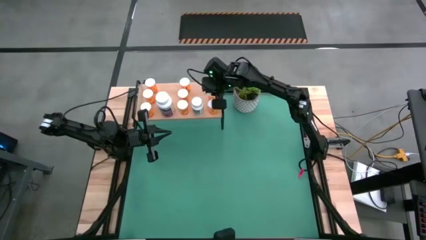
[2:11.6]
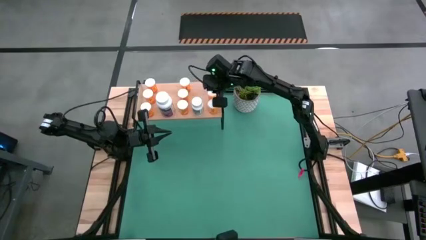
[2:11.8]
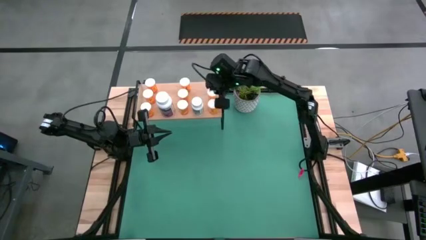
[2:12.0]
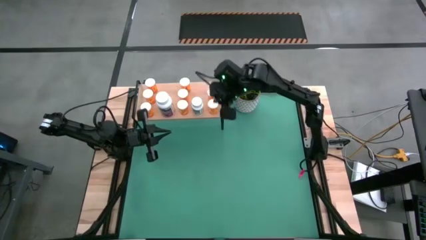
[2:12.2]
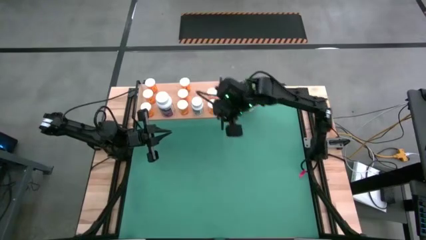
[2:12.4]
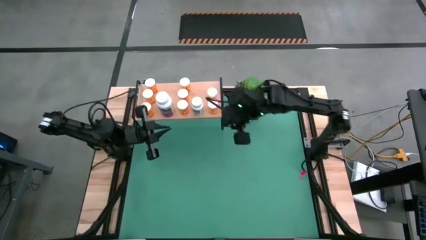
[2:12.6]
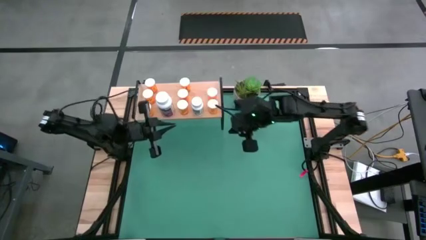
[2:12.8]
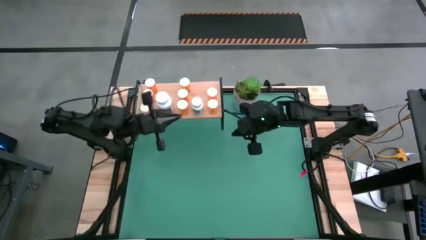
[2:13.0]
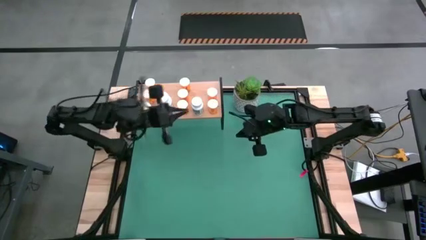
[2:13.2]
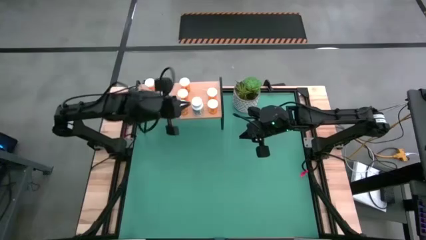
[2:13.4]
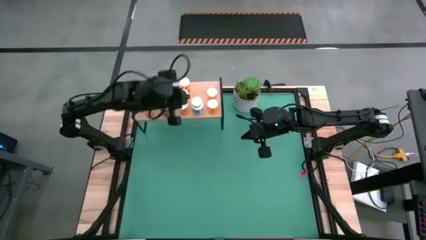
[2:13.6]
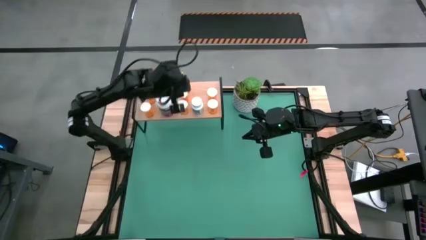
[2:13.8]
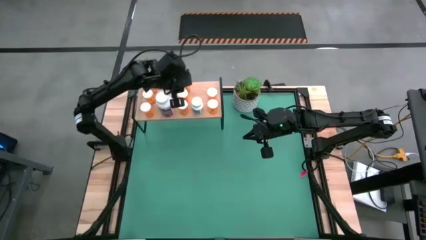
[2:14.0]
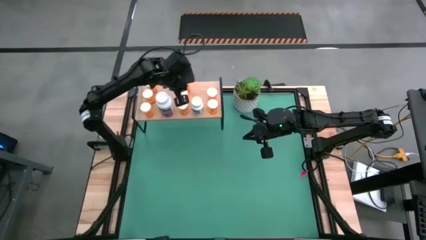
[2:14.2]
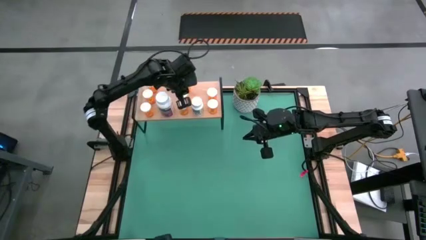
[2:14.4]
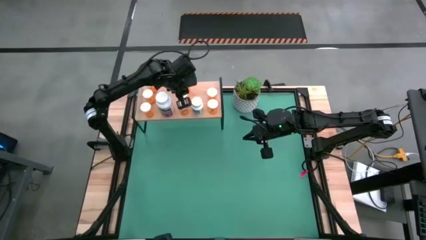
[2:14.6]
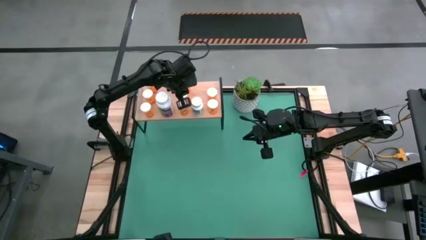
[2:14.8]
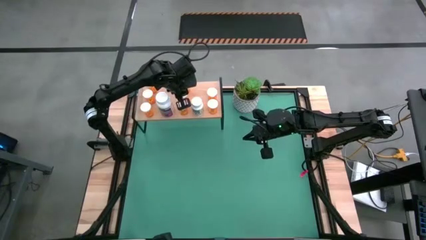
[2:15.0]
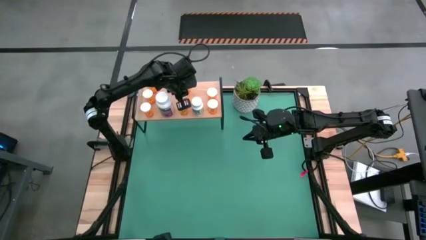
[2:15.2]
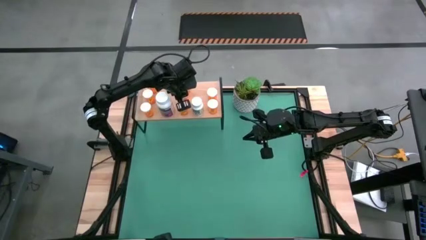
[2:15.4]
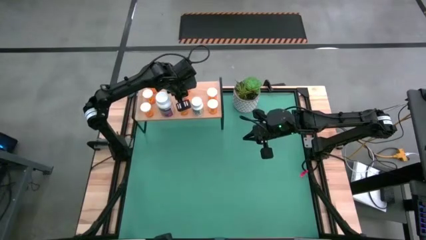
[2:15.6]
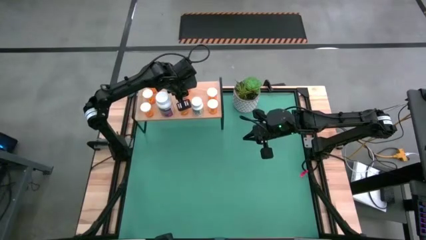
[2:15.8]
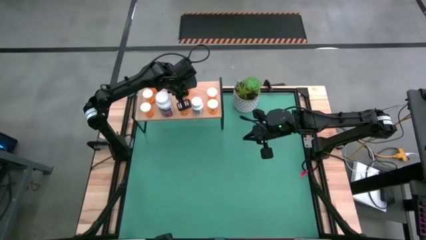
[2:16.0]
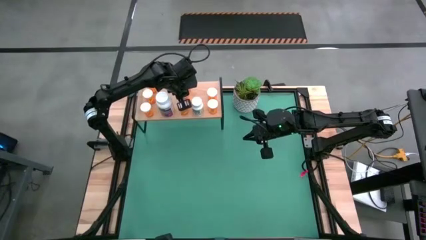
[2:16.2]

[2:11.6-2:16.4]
Task: Pick and place medicine bottles onto shelf by color
Adjust the orange pill bottle on the shelf

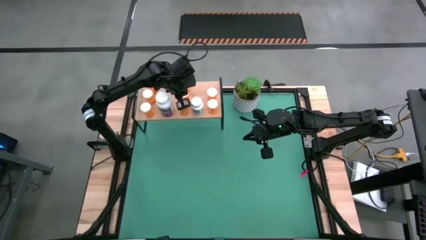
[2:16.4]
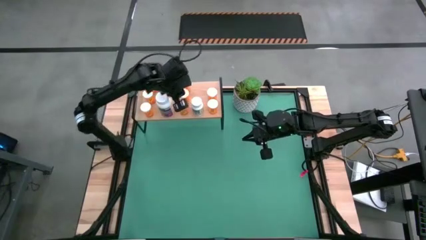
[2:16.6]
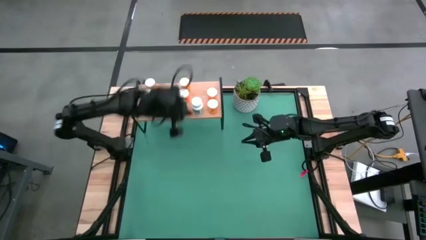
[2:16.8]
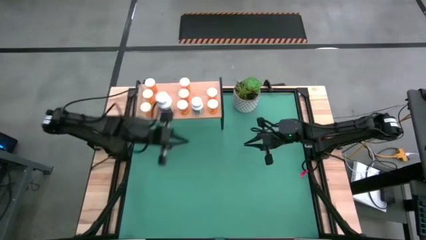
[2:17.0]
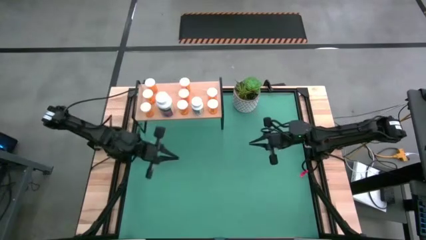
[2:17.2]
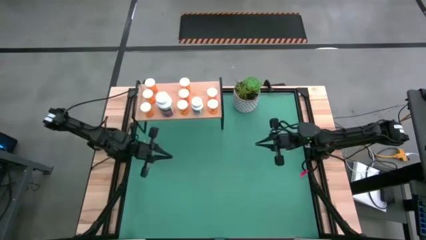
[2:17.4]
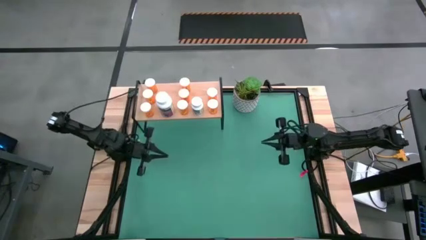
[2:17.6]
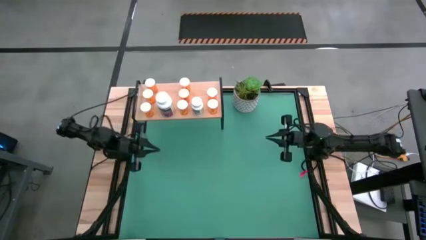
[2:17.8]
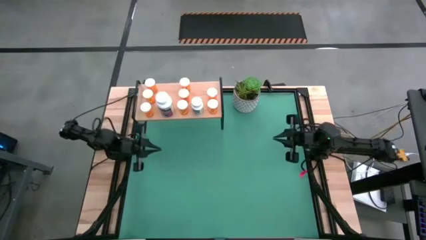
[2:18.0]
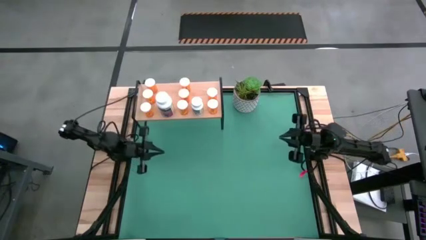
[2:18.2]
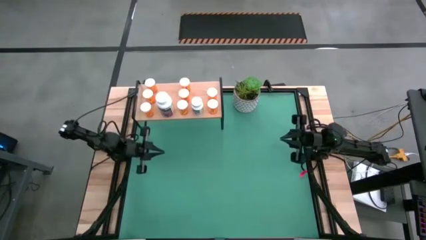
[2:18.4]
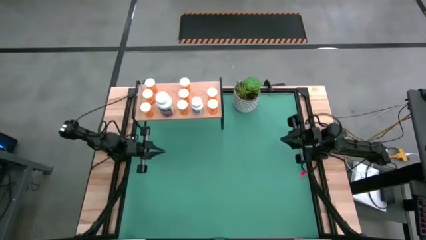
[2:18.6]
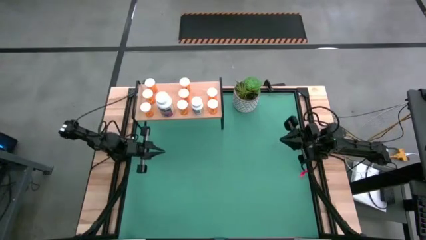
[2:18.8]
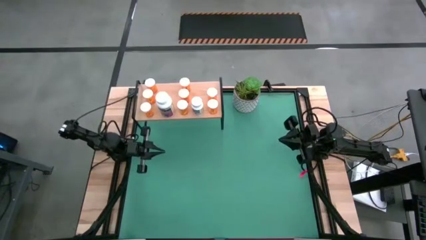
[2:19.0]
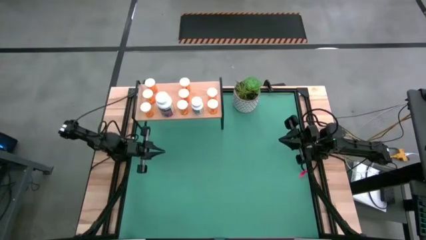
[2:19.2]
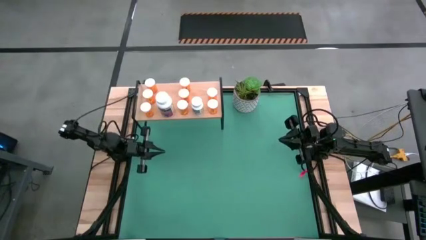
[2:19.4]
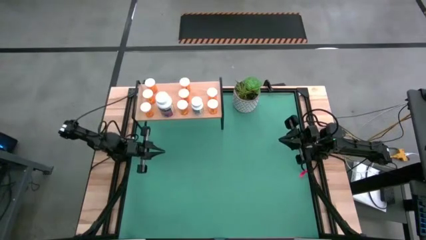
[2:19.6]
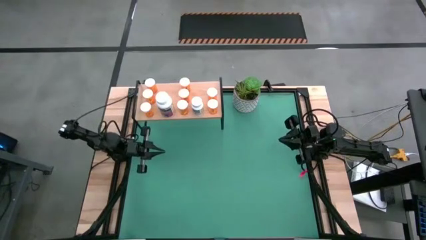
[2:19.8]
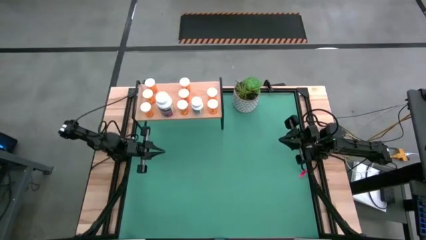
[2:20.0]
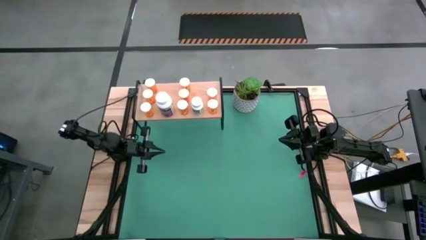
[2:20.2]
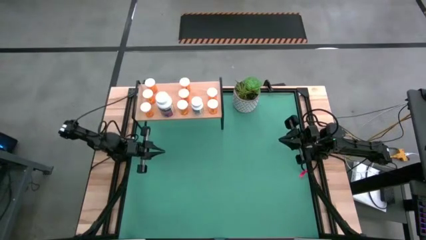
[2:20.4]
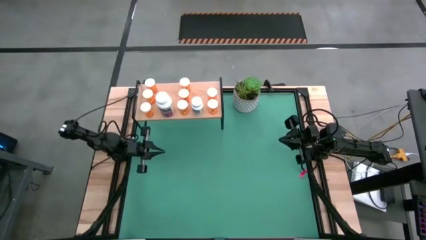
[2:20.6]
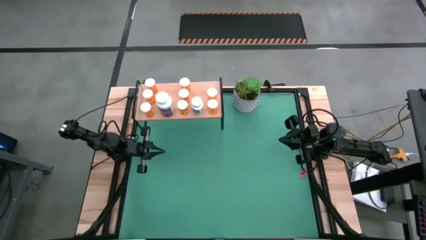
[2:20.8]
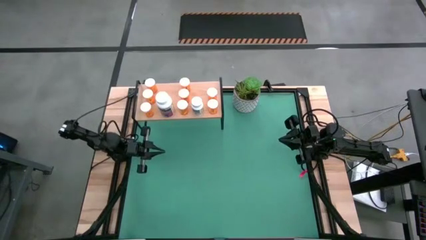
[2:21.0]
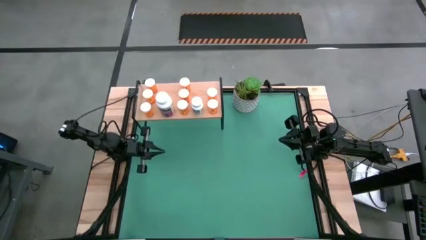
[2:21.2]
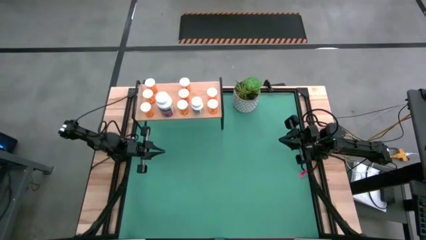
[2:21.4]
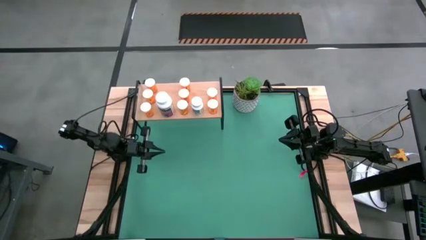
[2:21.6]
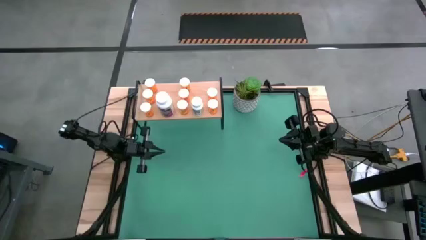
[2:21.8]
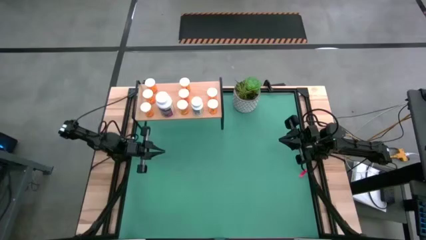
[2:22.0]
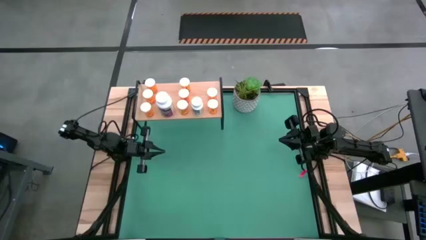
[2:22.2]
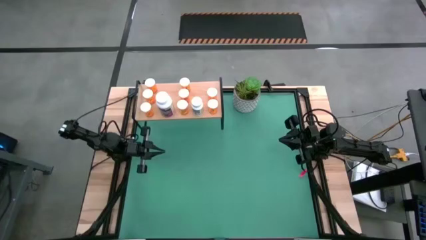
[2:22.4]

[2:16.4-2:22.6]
Return to Home Position

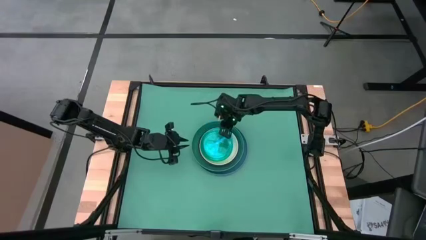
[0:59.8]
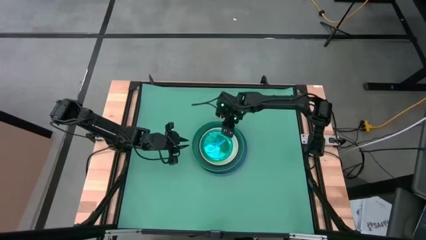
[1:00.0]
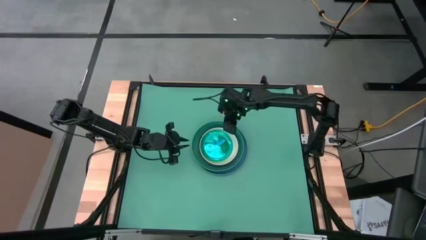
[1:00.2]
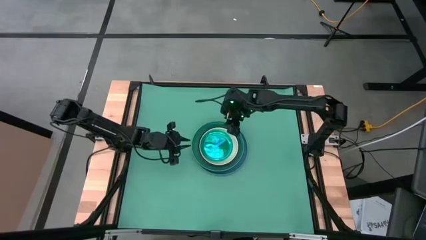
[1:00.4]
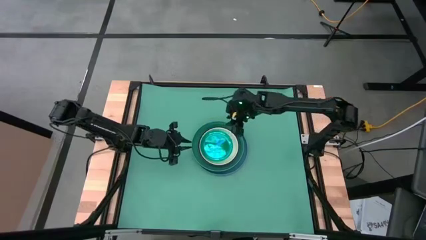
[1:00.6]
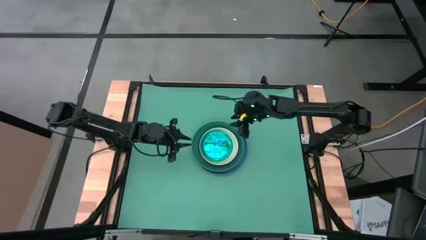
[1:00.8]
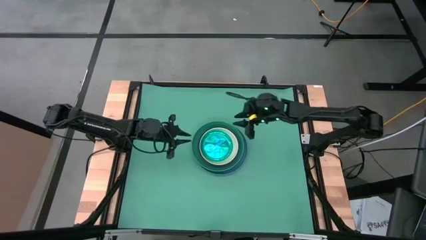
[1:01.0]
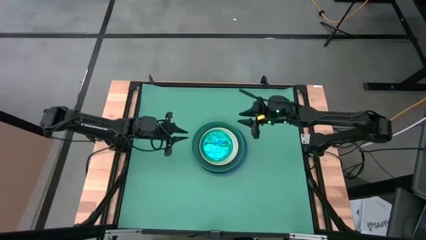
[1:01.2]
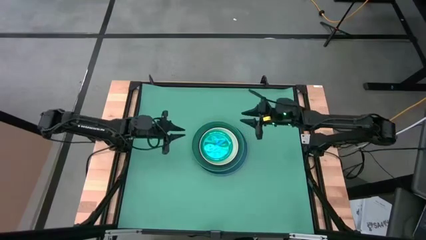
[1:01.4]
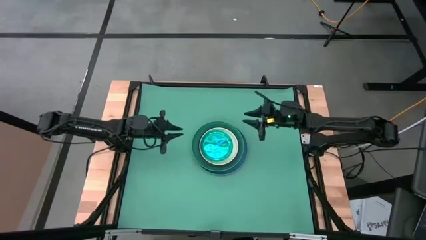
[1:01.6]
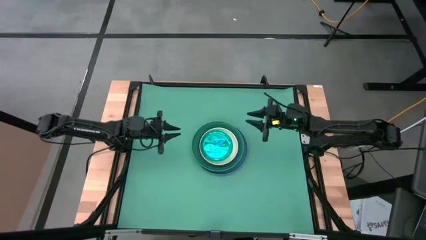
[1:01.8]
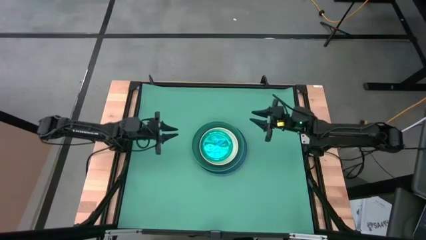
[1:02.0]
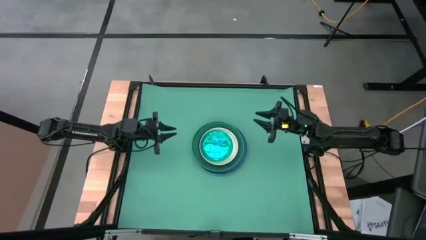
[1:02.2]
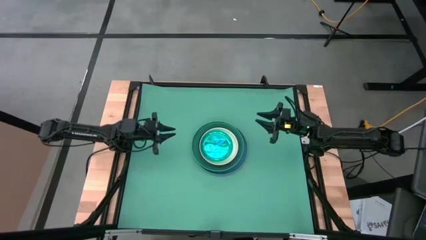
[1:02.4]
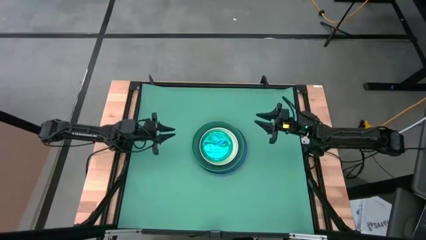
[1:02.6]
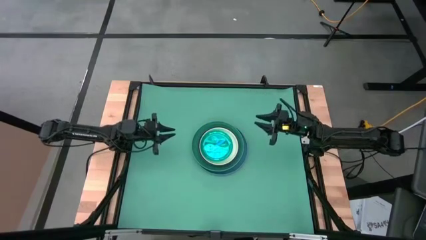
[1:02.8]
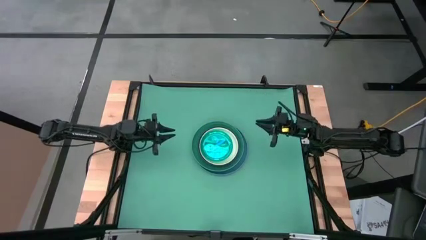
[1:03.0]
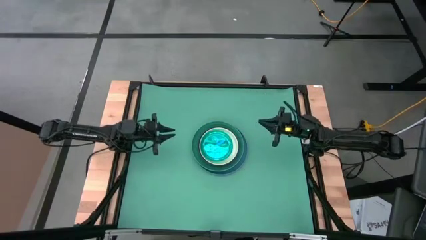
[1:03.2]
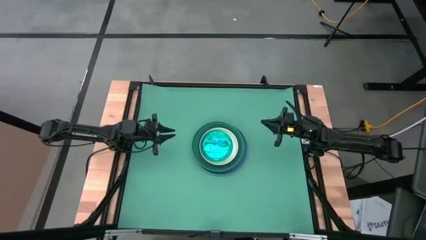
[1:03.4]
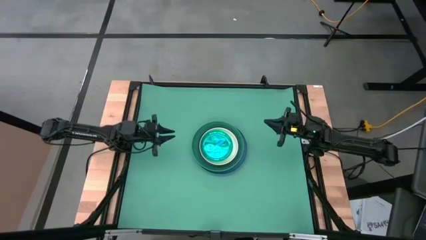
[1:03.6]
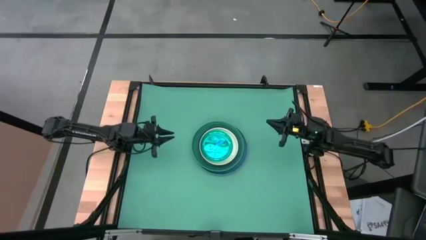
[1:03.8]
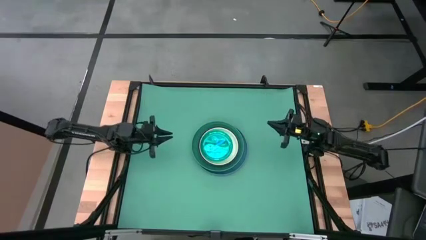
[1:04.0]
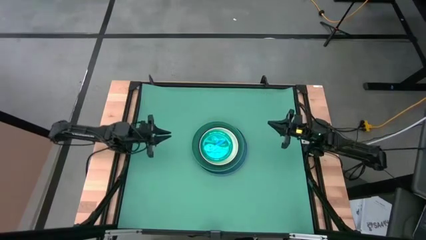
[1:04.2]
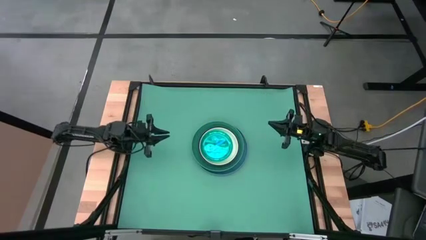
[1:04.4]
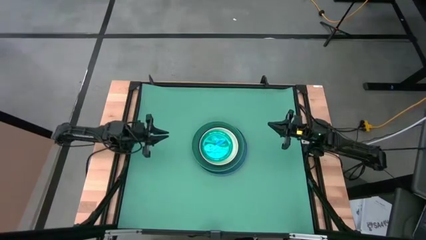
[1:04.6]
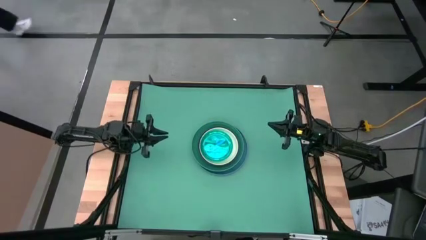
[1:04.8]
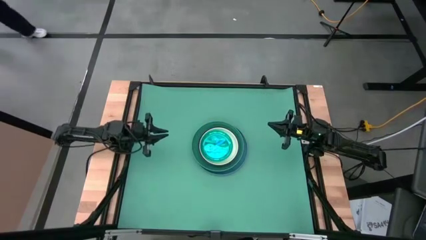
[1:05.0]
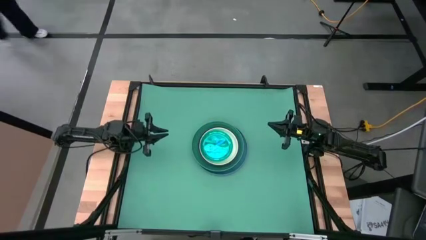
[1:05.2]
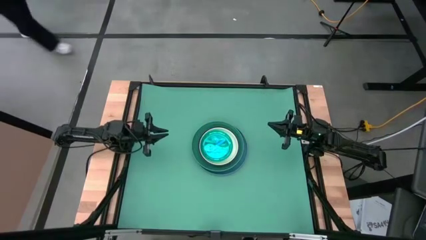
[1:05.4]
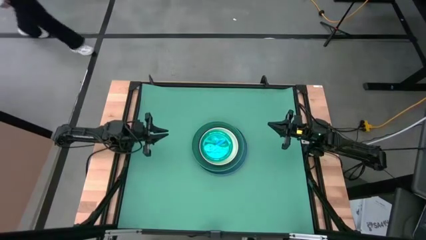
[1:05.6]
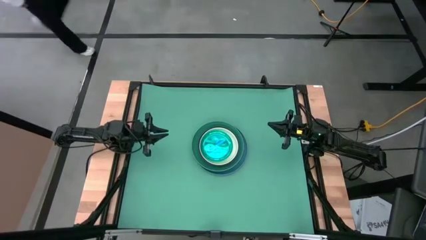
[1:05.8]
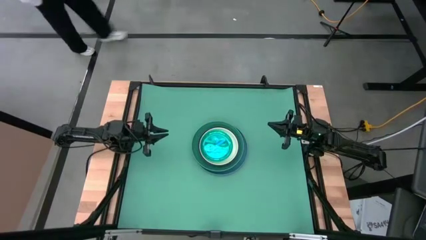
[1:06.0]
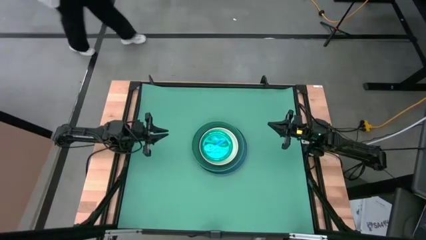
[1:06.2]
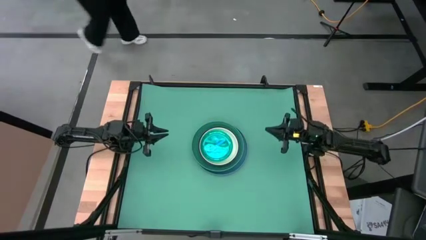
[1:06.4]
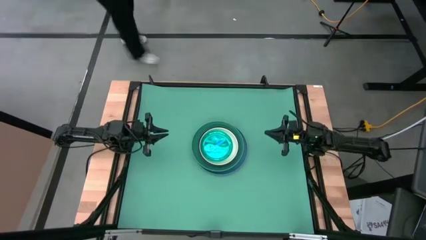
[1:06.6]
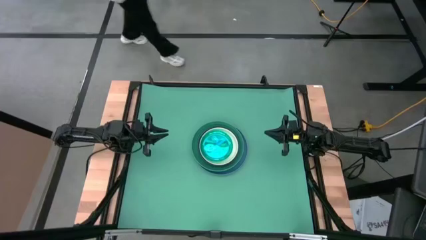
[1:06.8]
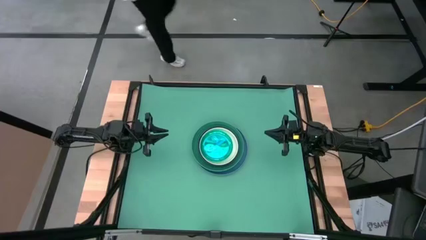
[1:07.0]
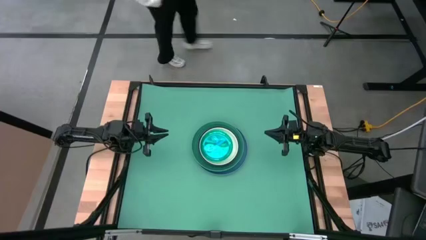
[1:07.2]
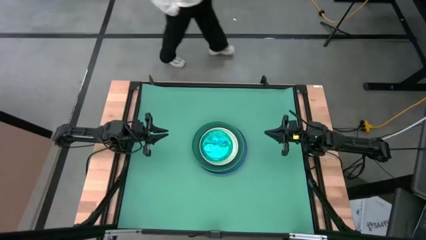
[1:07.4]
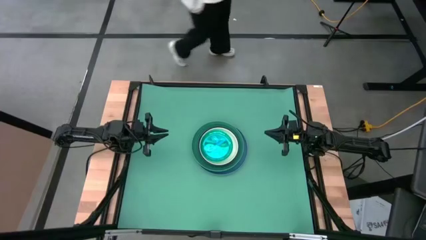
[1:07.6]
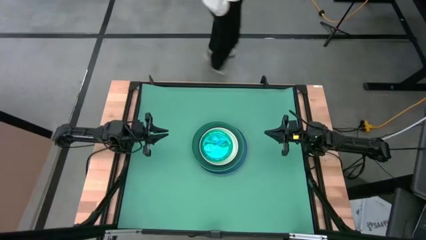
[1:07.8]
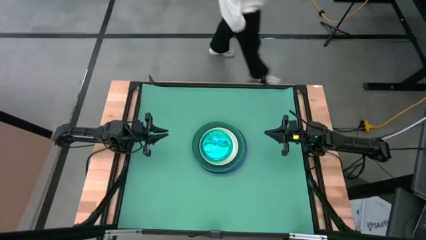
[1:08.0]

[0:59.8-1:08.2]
Task: Stack plastic plates
Return to Home Position
